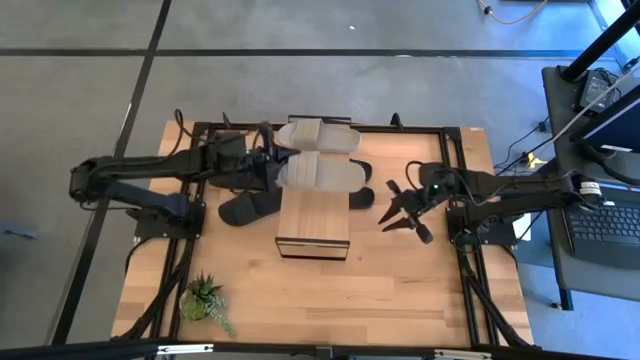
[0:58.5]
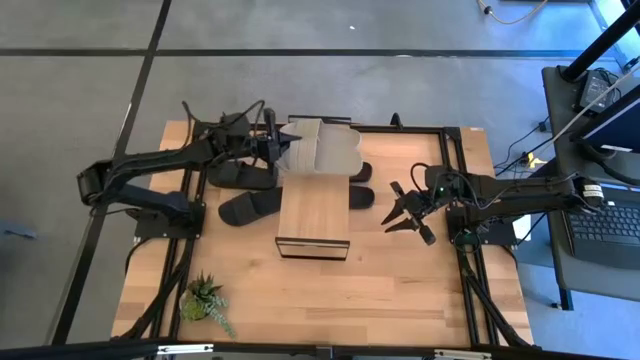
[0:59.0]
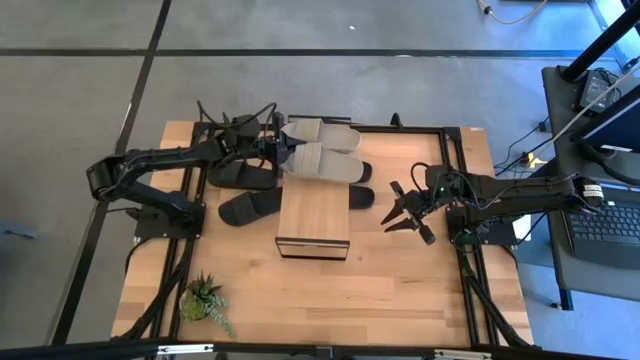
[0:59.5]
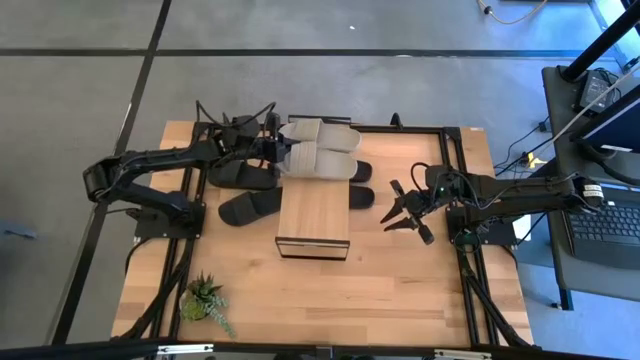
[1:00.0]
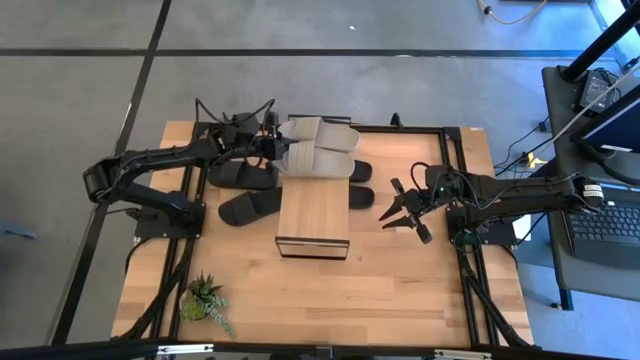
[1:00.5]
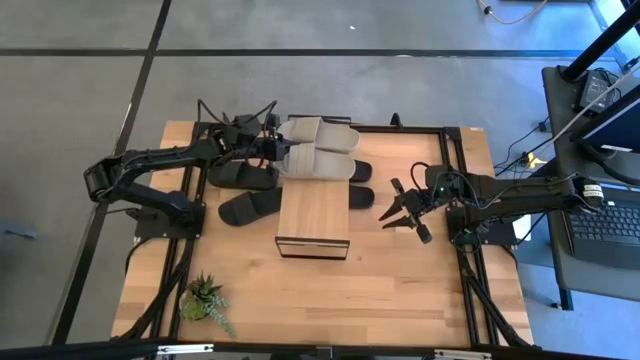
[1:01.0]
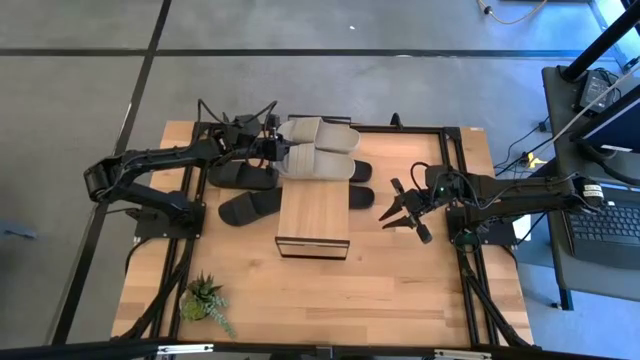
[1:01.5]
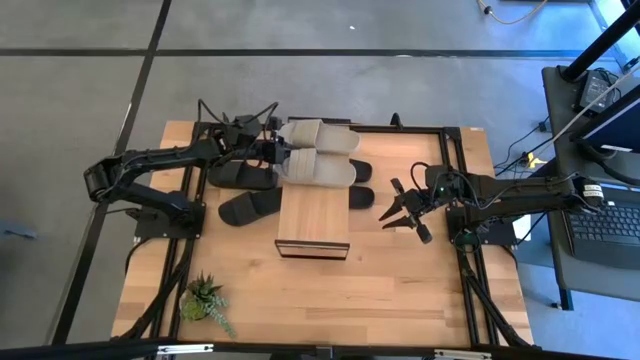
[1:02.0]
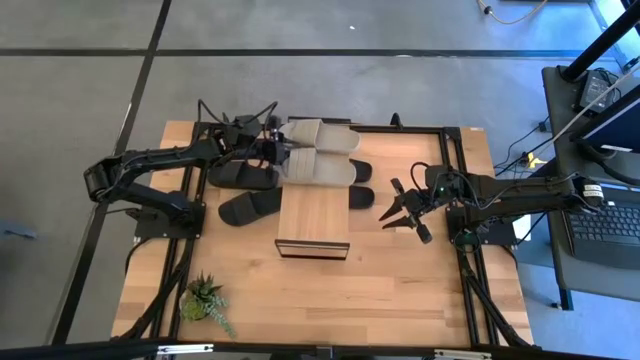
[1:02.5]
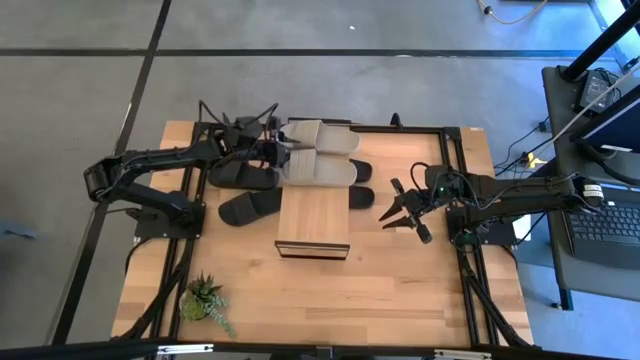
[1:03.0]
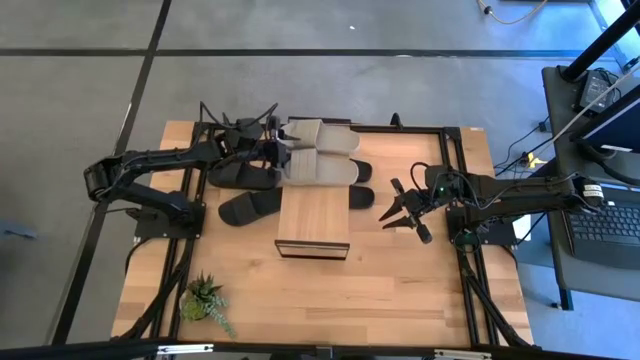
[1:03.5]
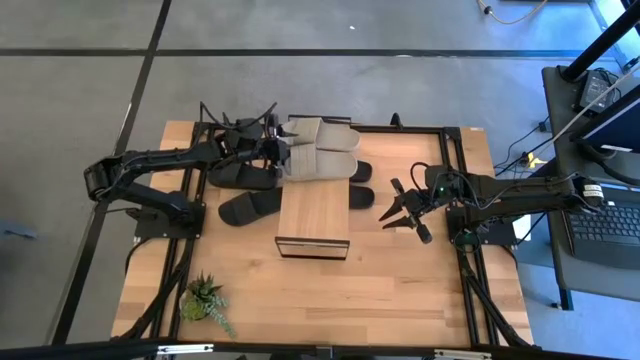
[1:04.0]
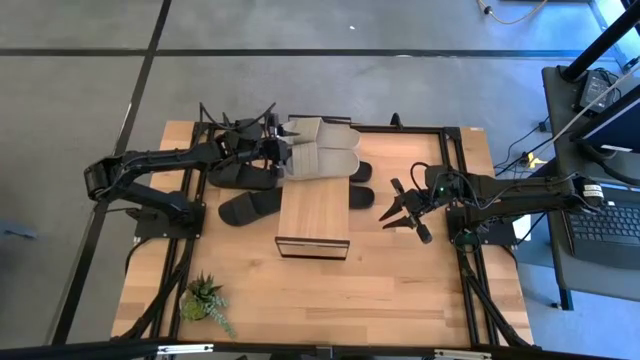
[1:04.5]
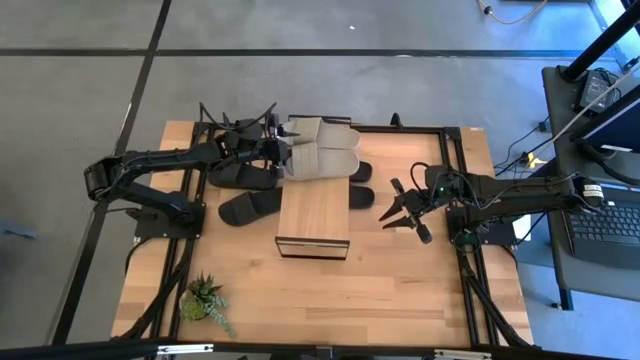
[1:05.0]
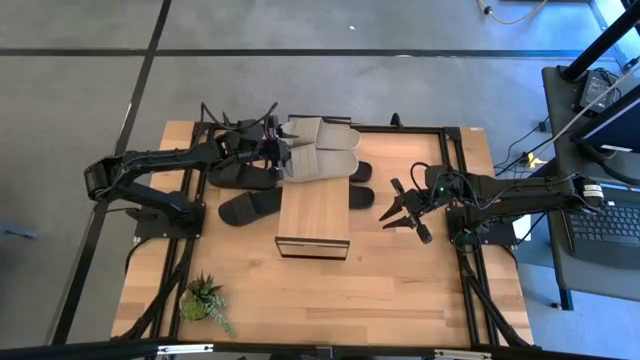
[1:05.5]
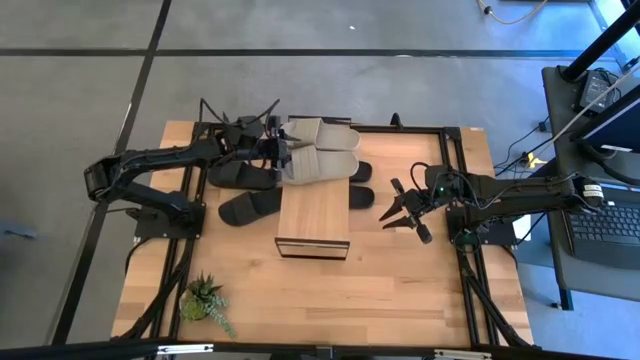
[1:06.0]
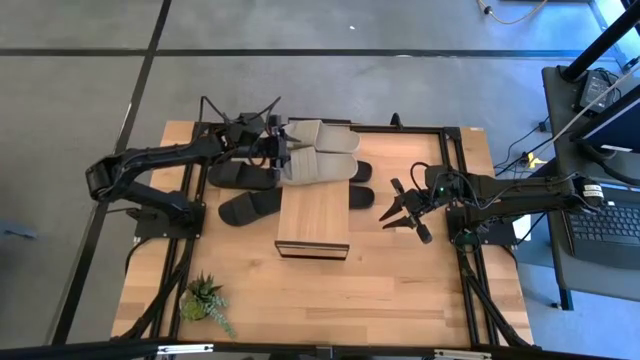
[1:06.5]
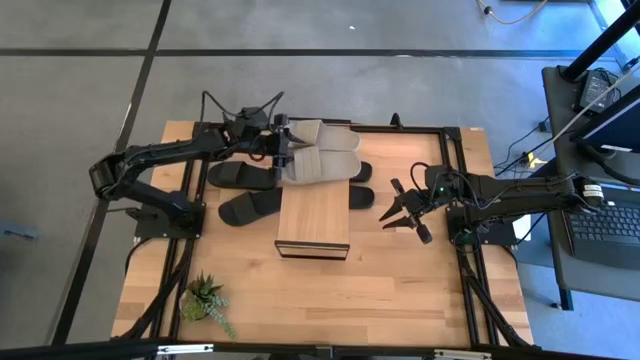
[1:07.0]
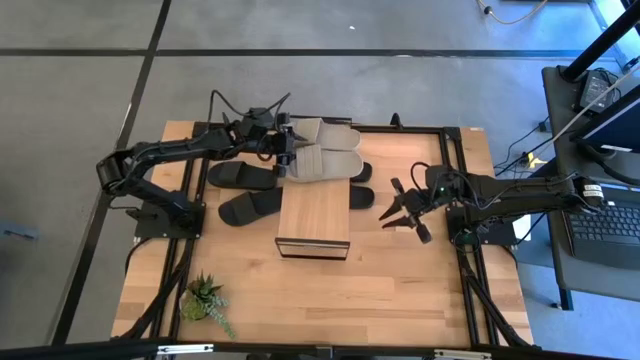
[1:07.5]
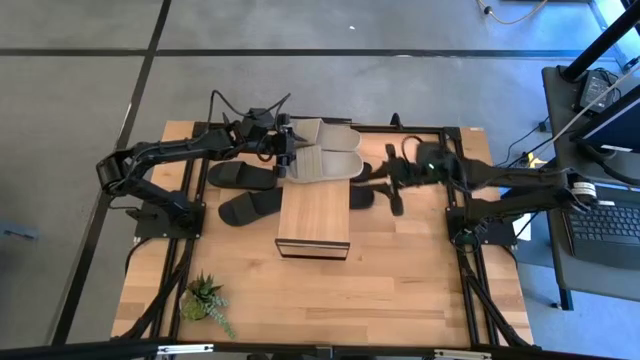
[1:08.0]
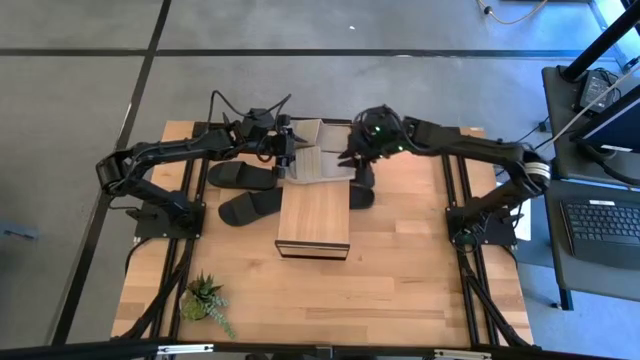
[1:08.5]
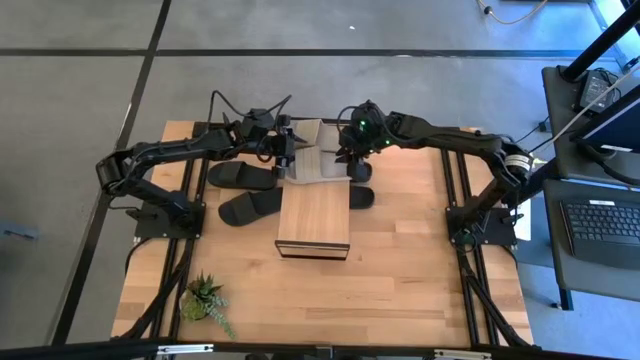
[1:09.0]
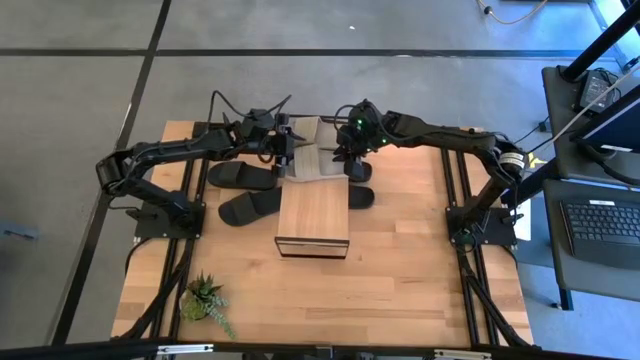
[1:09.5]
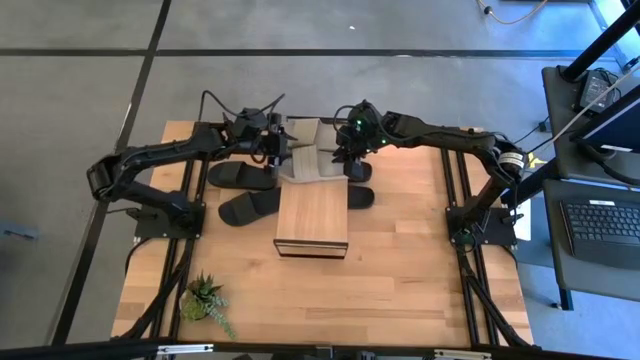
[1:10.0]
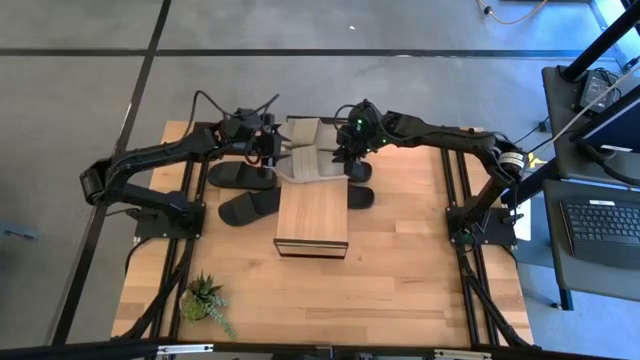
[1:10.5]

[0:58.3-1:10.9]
Task: Pick and place slides into the shelf
Put the gray slide on the shelf

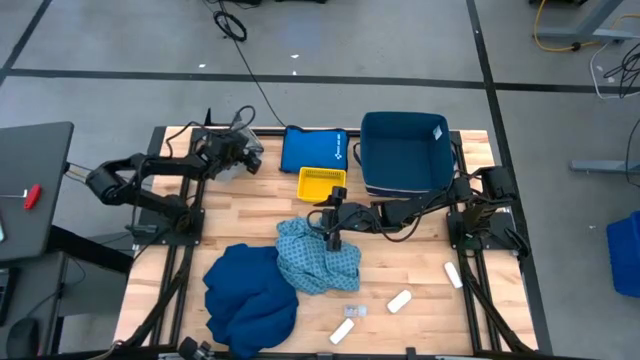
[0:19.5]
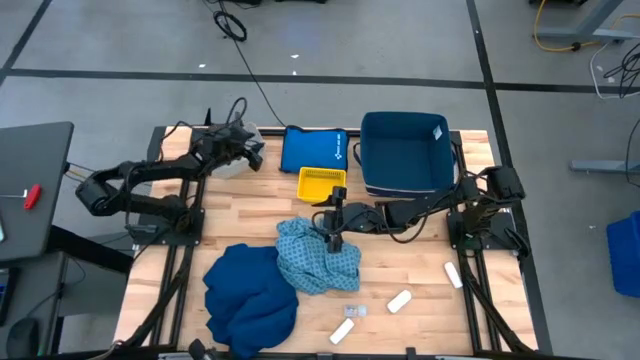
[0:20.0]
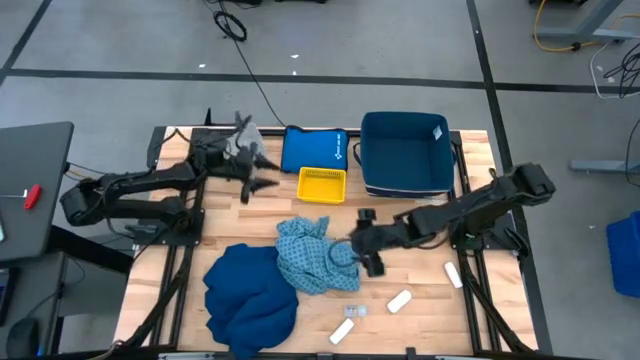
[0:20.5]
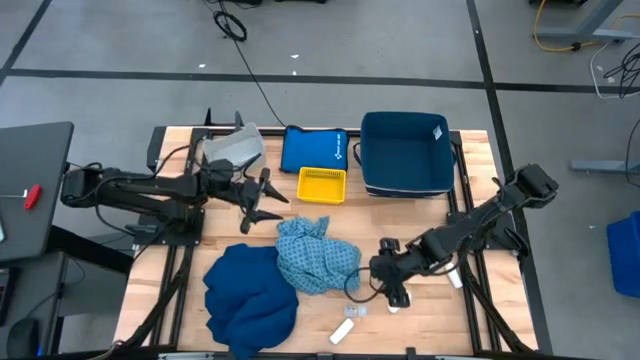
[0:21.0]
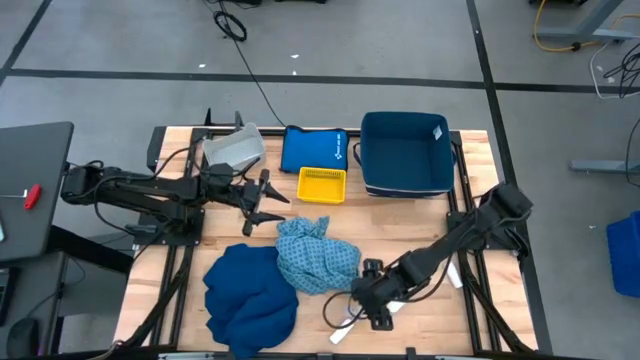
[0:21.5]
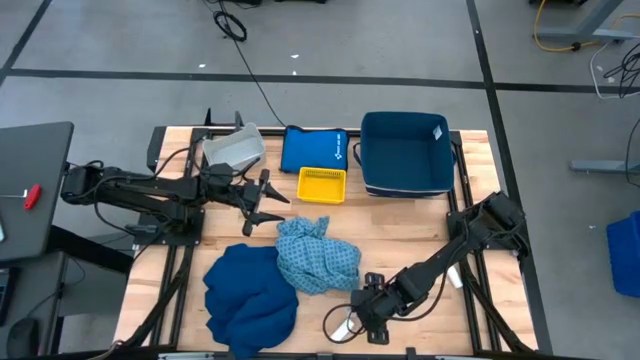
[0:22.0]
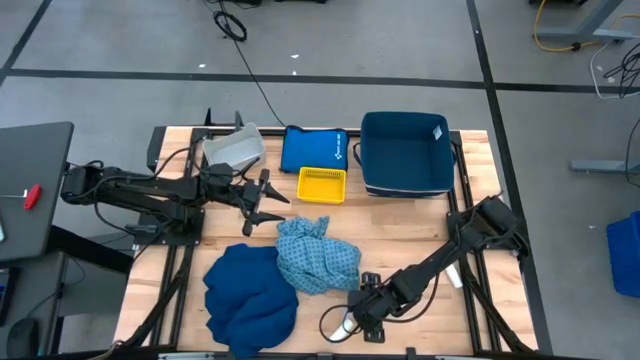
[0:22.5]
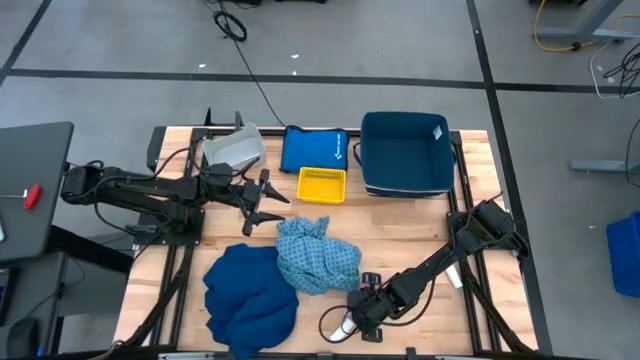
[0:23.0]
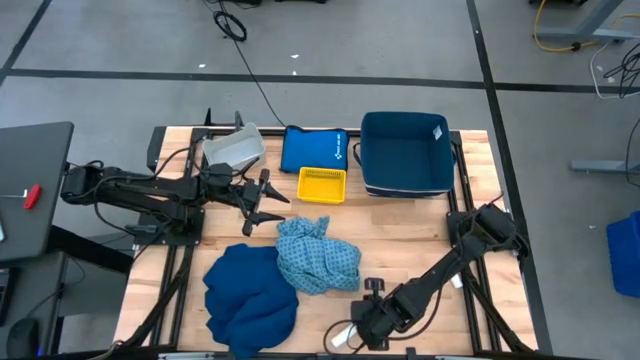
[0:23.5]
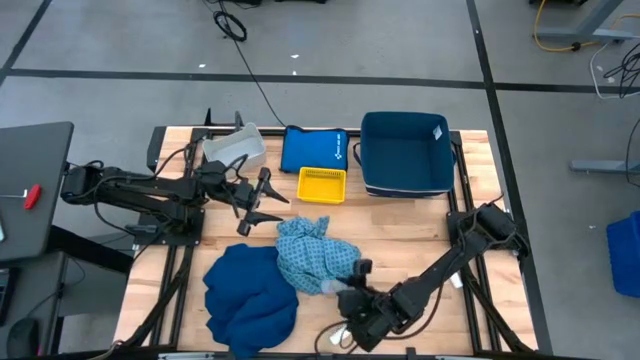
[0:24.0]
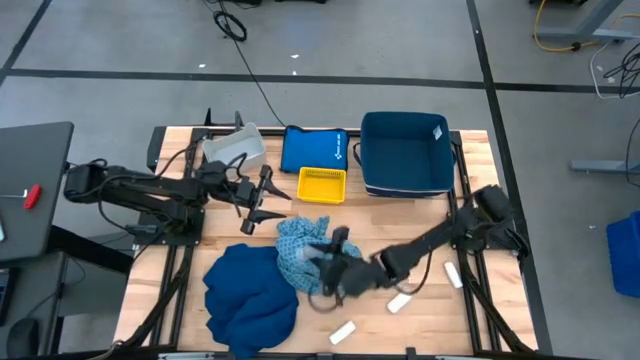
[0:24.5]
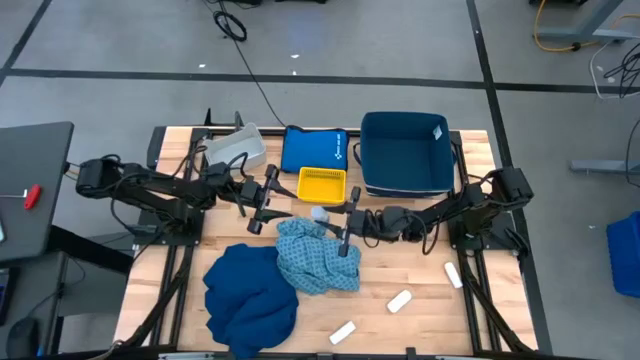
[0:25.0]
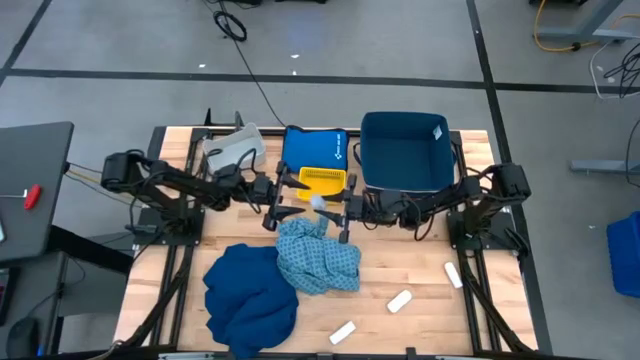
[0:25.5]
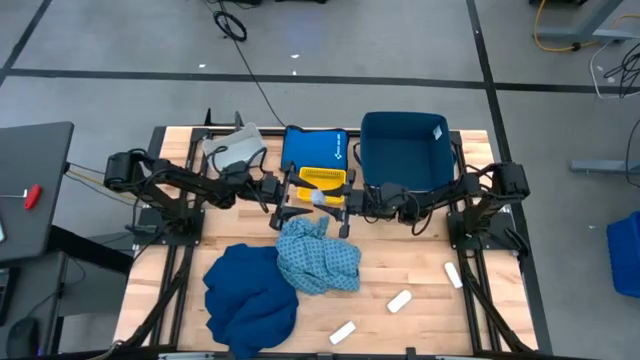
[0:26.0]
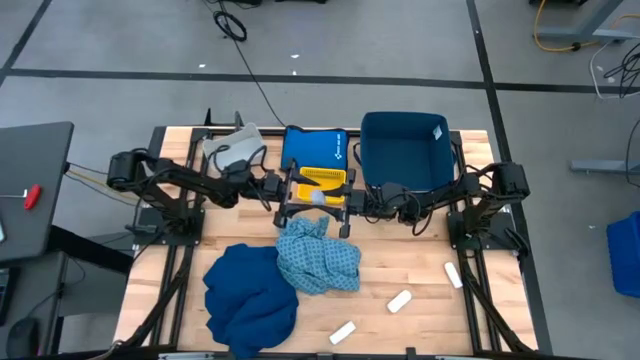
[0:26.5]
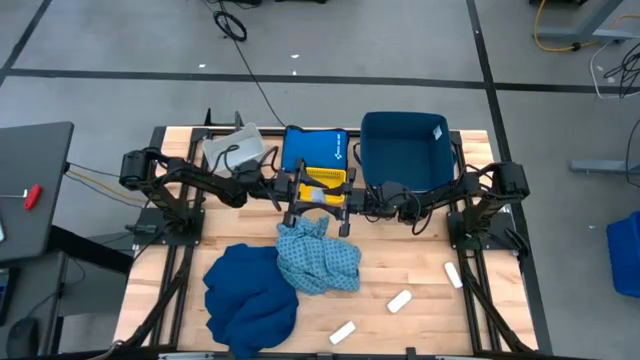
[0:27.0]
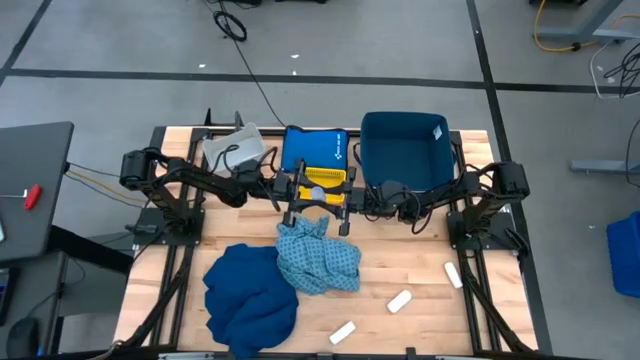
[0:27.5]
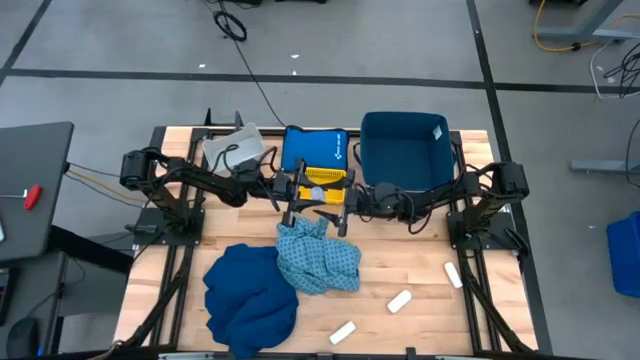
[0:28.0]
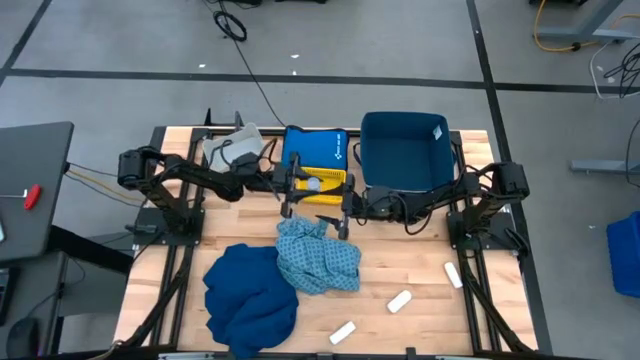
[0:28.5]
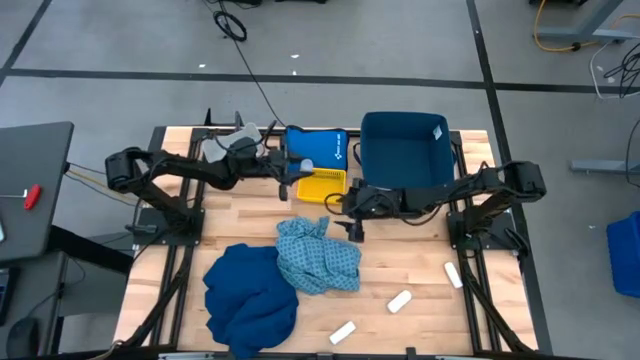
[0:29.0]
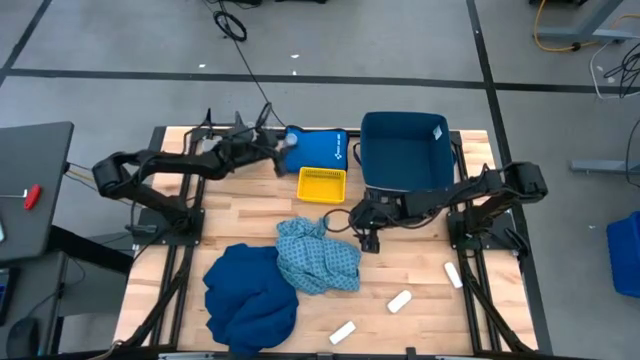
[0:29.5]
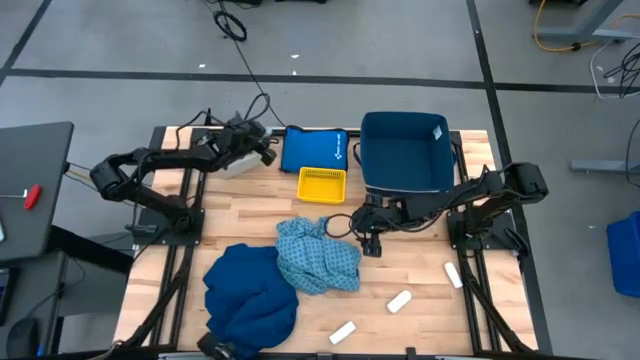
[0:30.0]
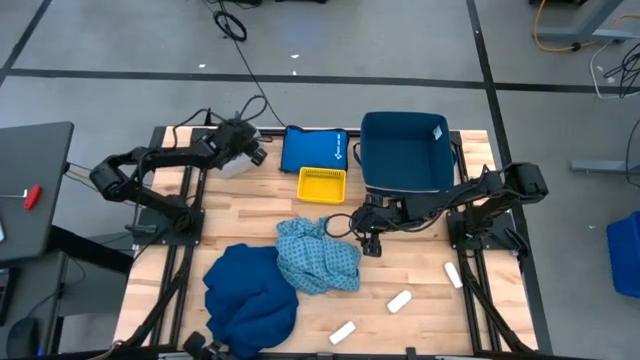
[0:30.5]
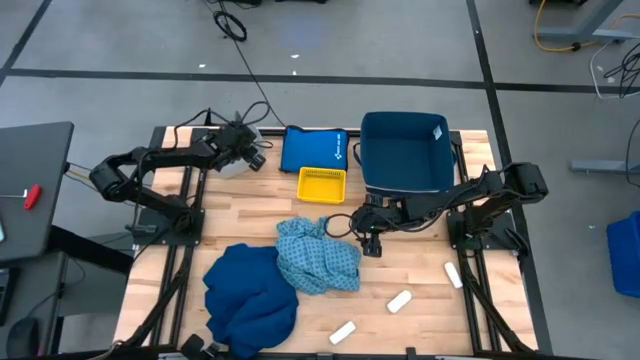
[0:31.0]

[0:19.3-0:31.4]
Task: Pick & place medical supplies in basket/bin
Put the transparent pill bottle into the gray bin
